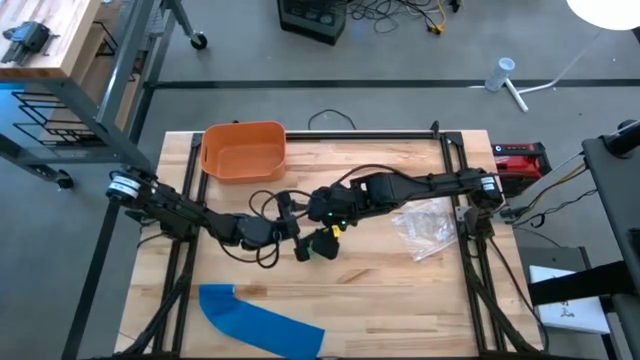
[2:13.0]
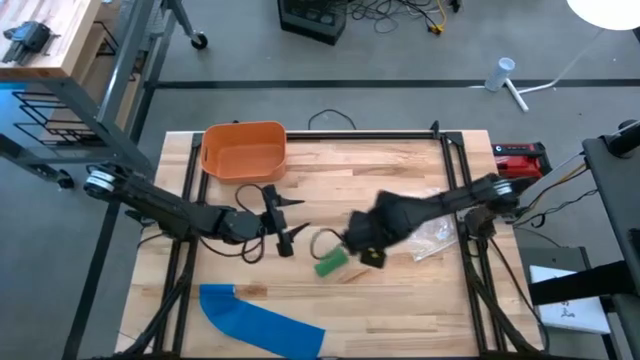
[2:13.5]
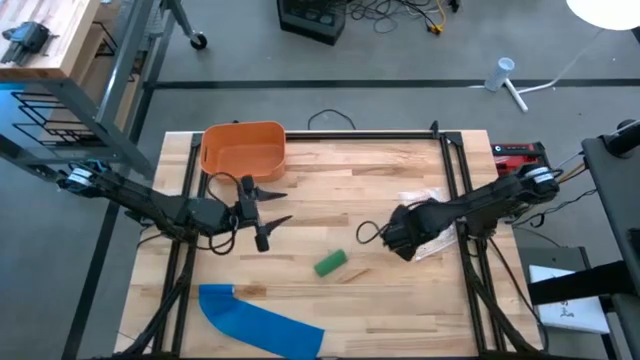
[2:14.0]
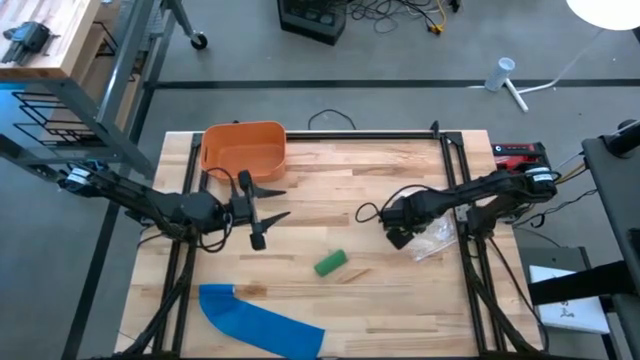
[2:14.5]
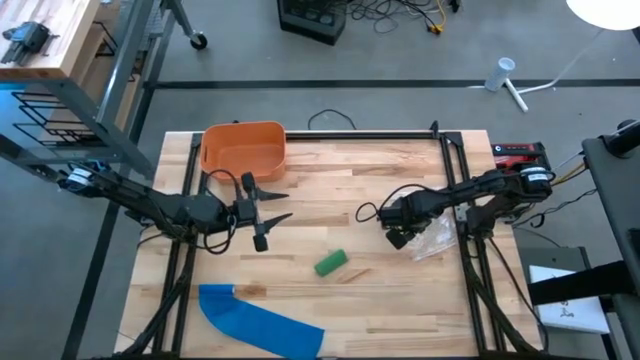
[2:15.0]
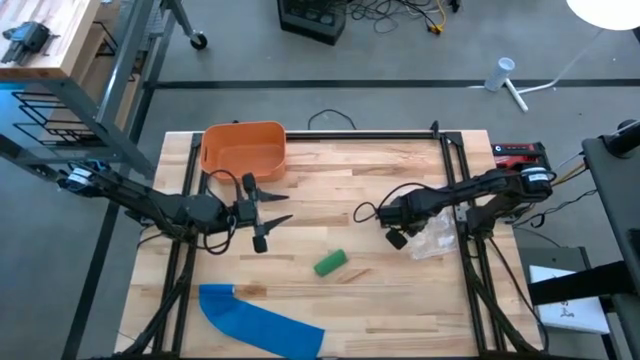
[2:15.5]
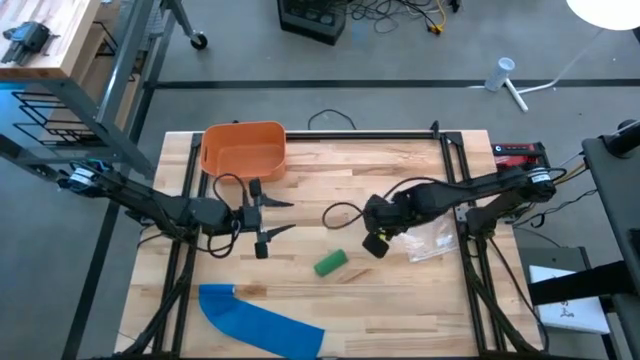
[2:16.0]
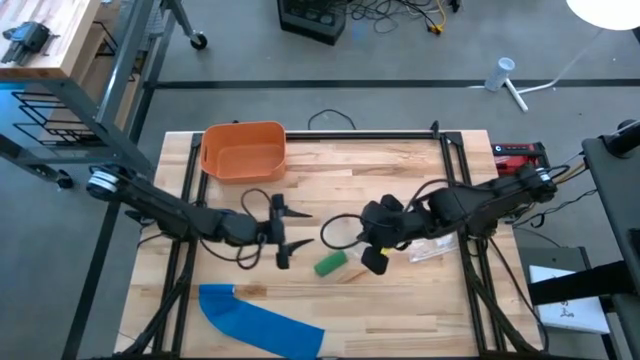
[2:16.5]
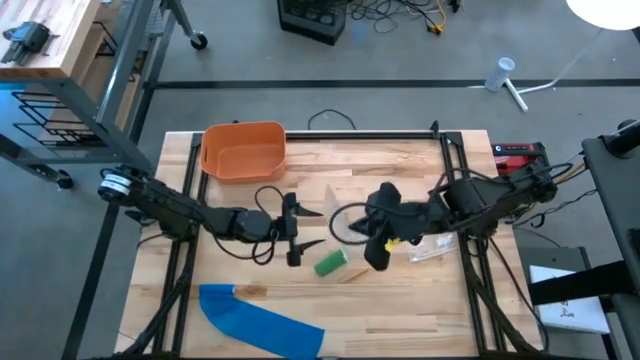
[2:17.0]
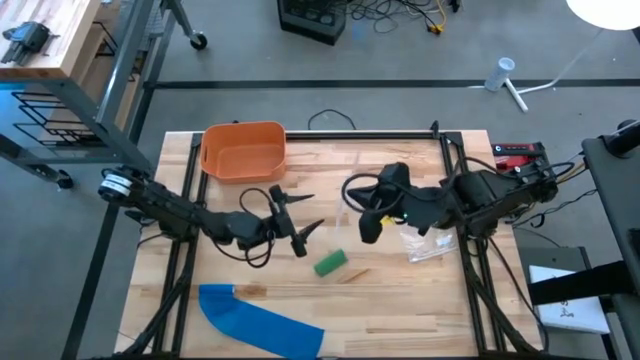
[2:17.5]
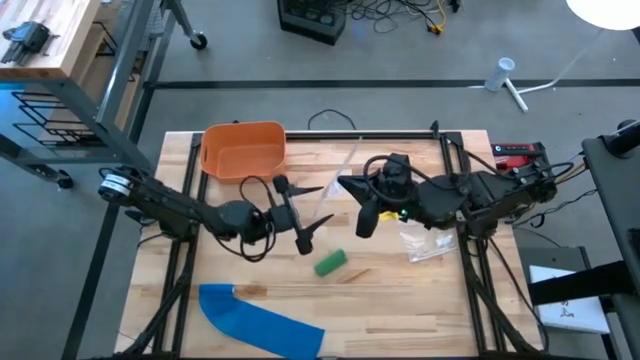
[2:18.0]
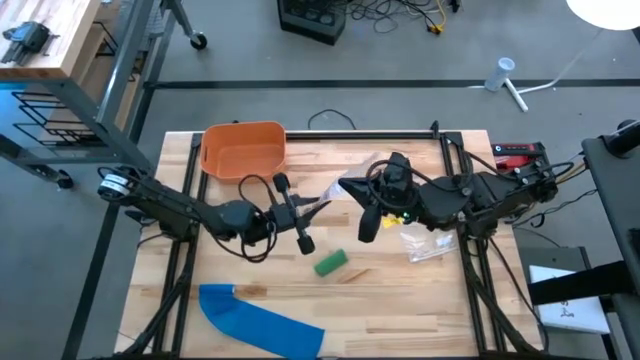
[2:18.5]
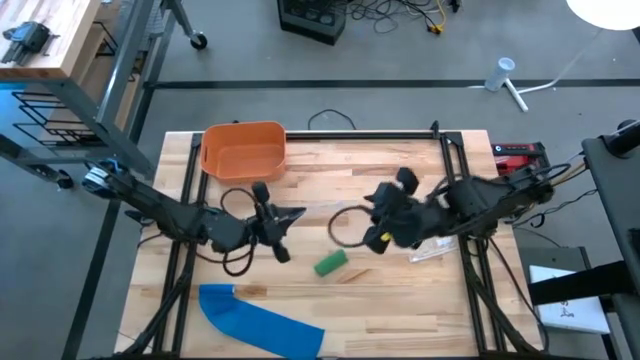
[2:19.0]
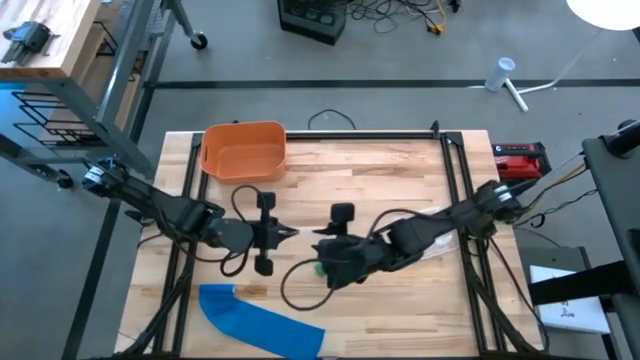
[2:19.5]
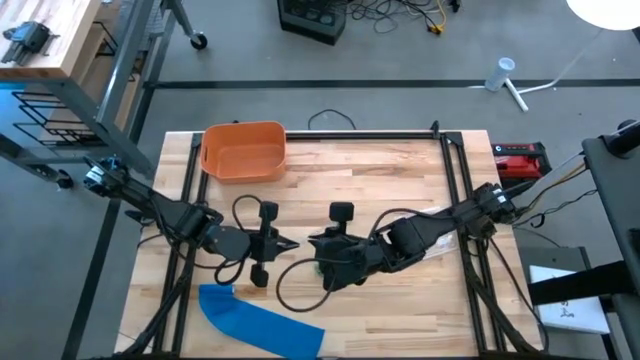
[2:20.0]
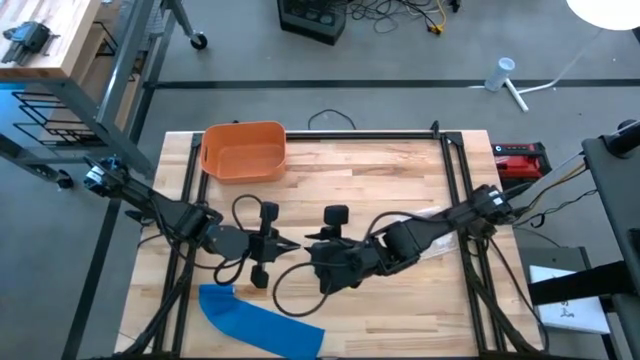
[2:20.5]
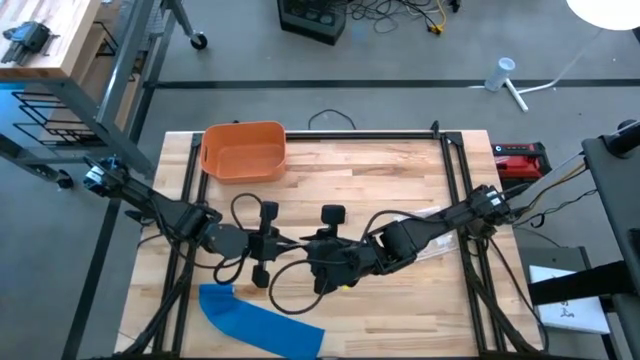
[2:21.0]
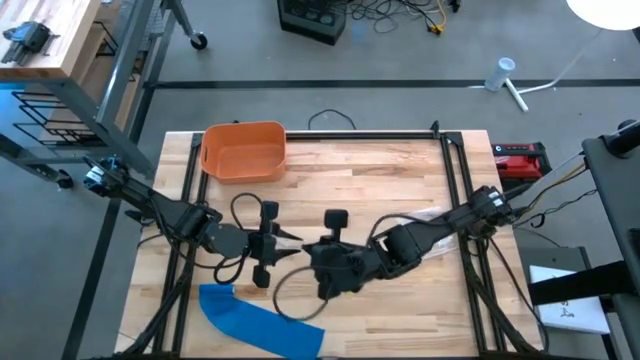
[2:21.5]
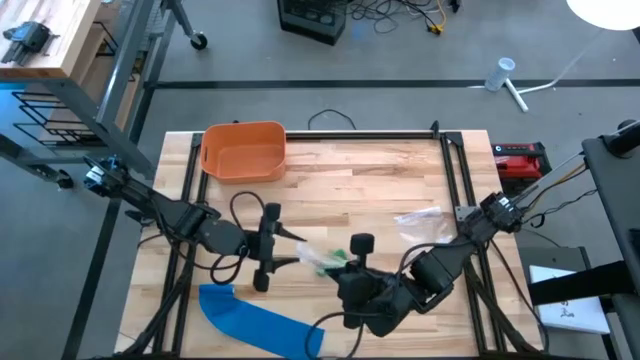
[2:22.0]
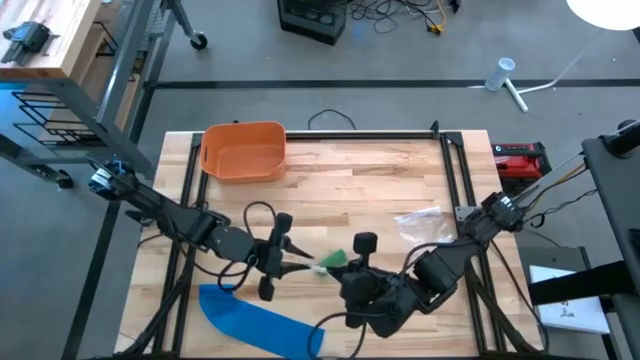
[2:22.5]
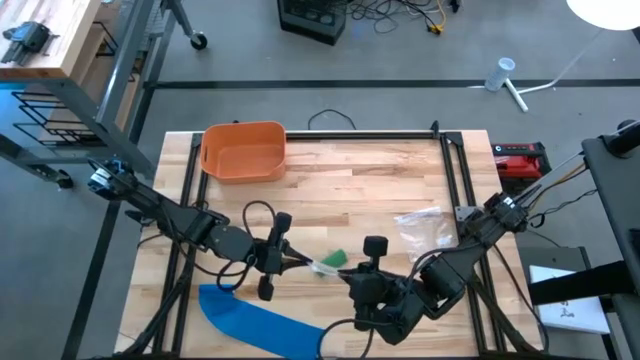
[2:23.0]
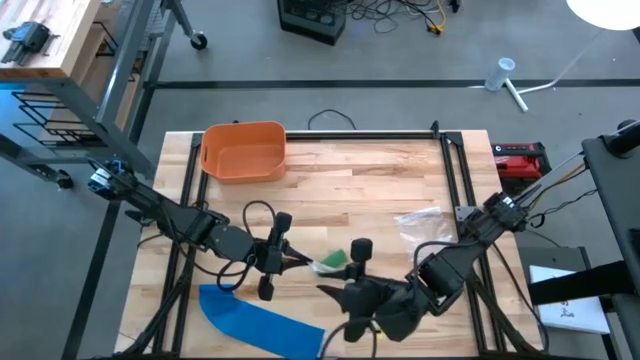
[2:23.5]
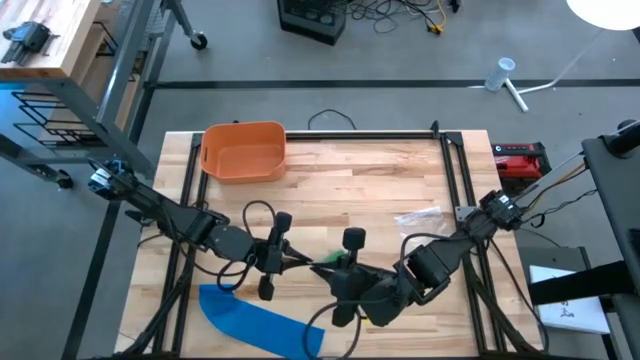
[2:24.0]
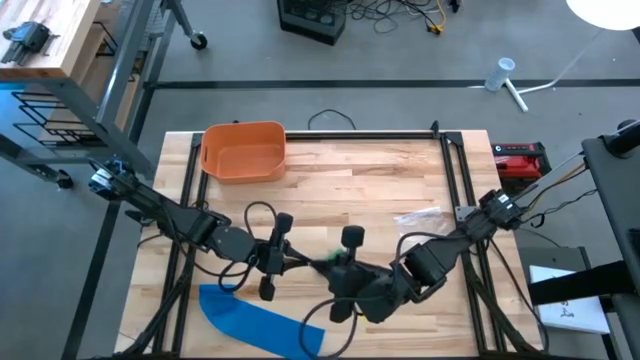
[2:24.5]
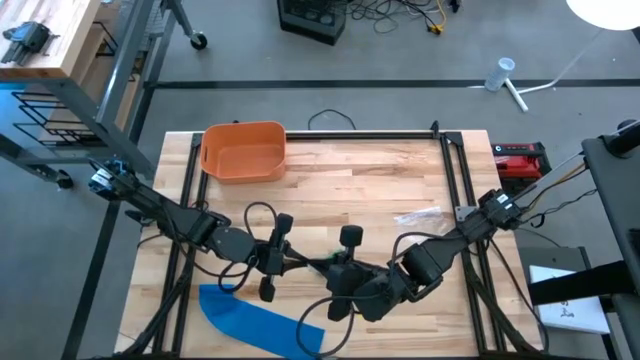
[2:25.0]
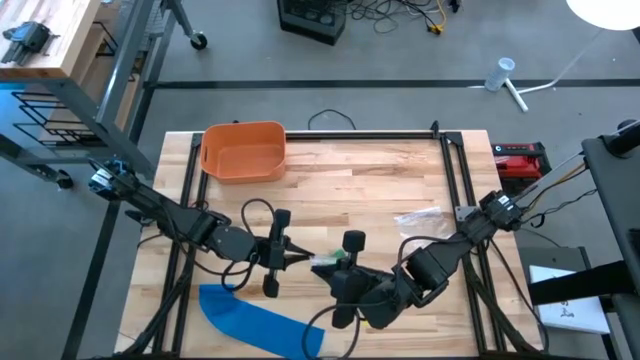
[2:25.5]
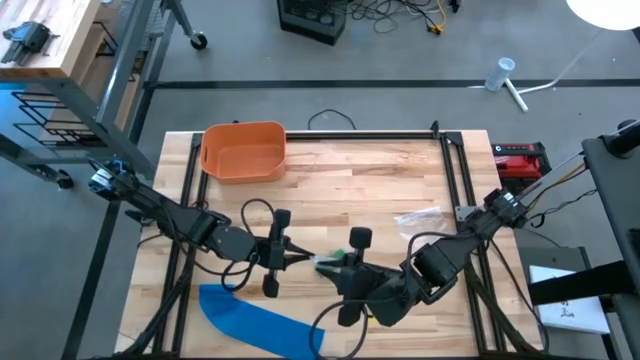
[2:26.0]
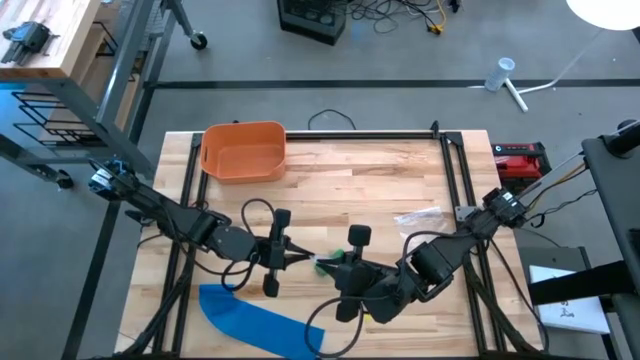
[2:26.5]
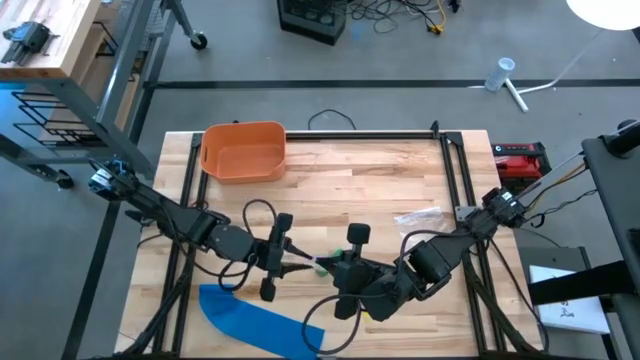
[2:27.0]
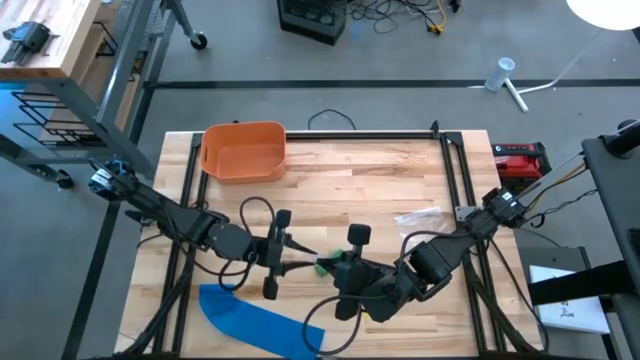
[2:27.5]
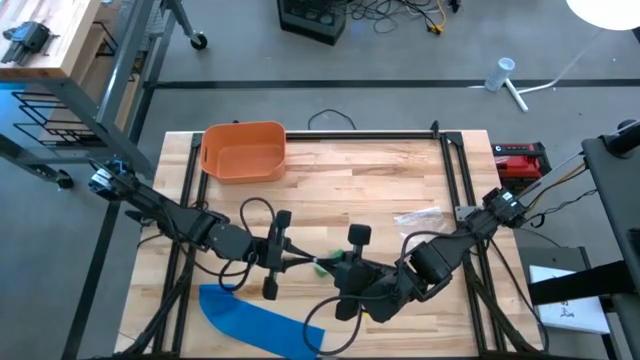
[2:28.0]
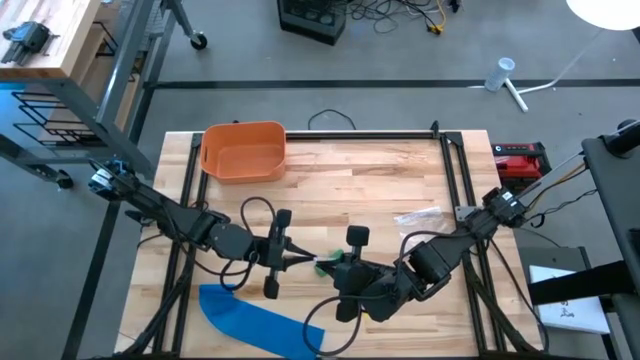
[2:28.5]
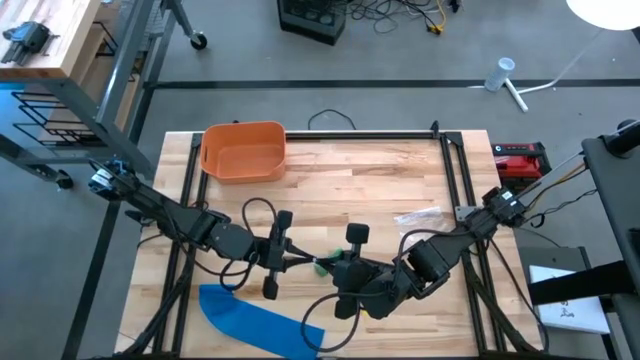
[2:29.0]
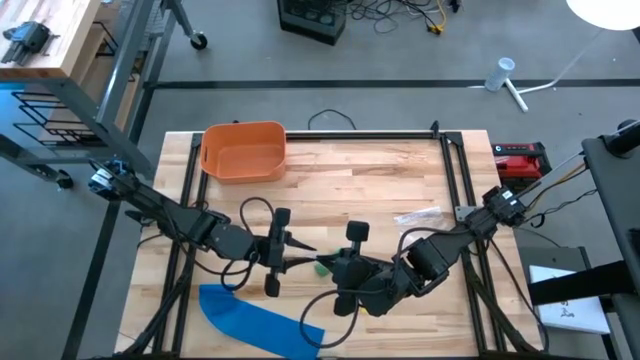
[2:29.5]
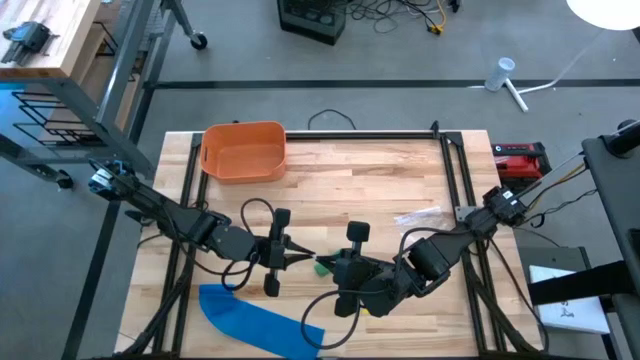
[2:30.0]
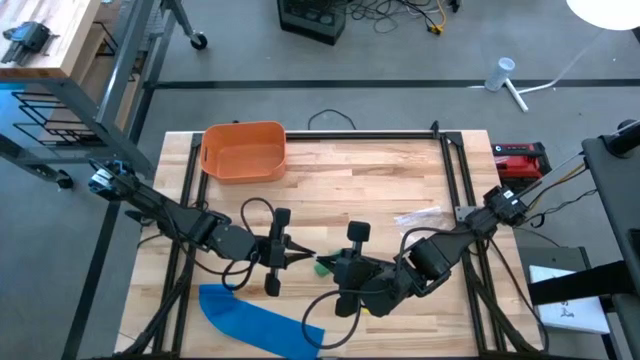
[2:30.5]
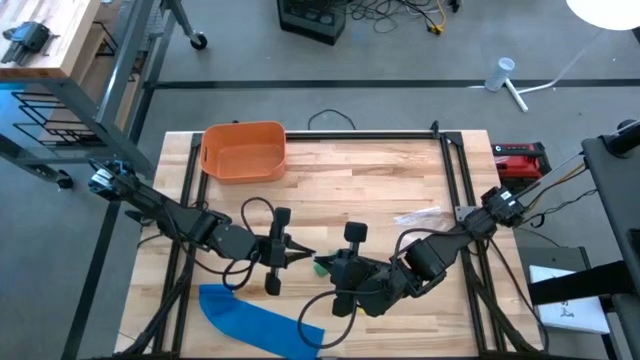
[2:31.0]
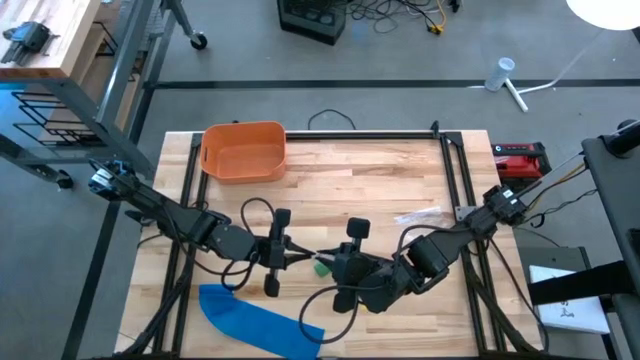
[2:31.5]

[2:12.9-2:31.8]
Task: Roll bandage
Open the top transparent zip bag

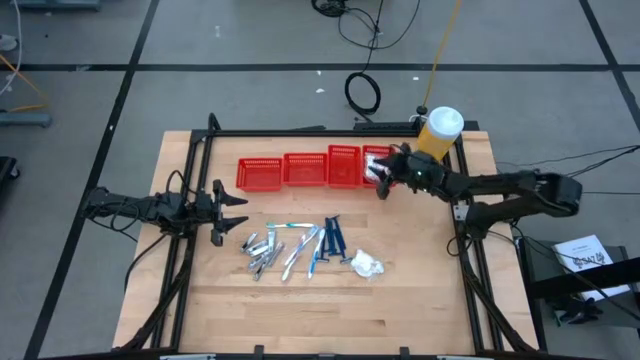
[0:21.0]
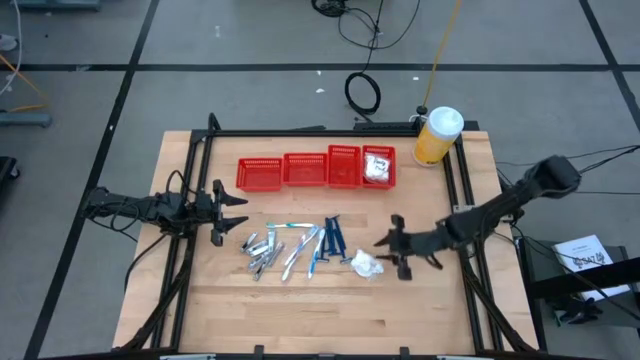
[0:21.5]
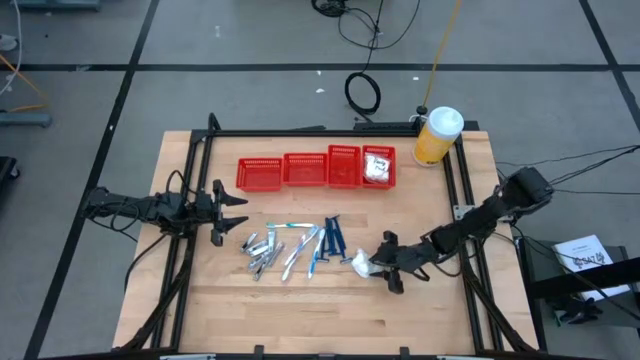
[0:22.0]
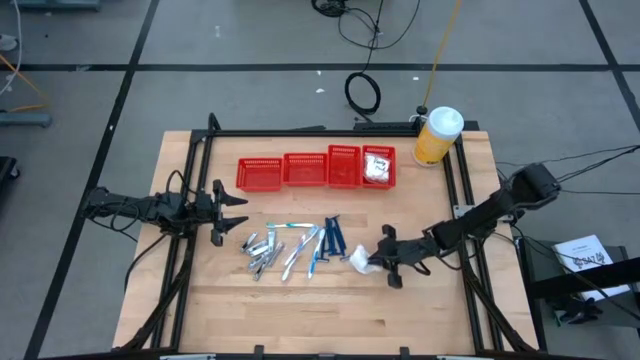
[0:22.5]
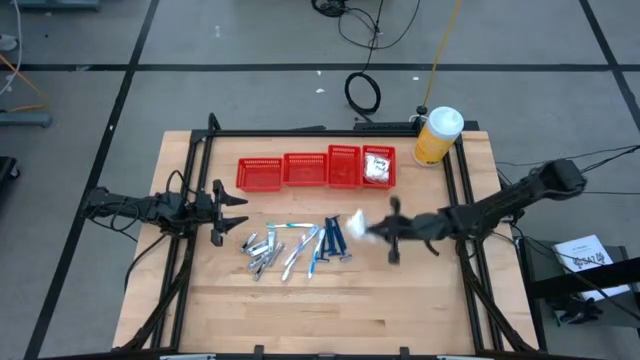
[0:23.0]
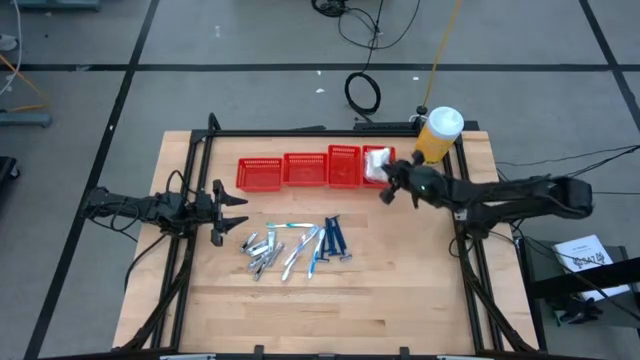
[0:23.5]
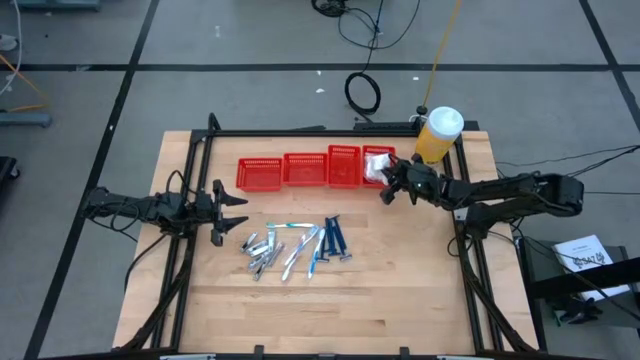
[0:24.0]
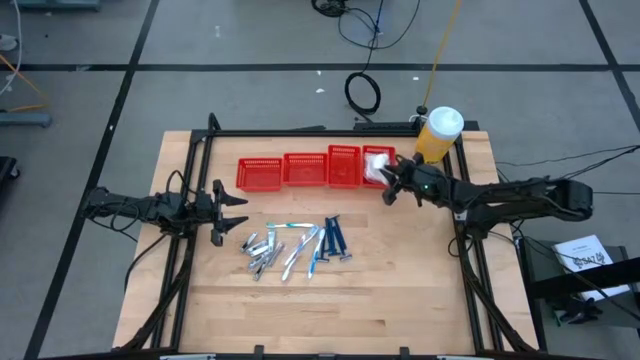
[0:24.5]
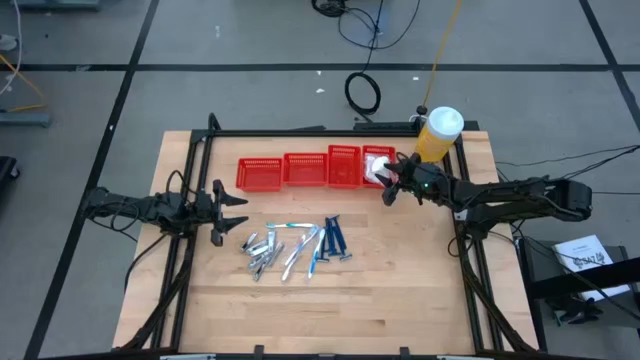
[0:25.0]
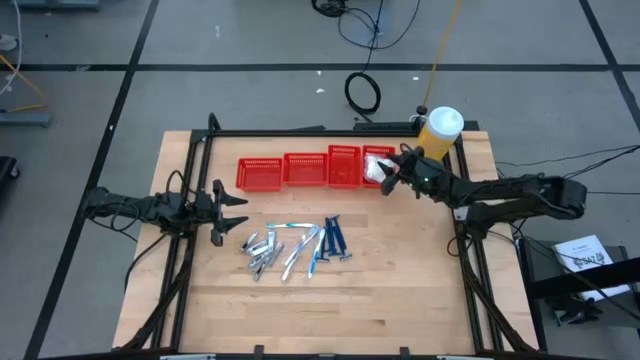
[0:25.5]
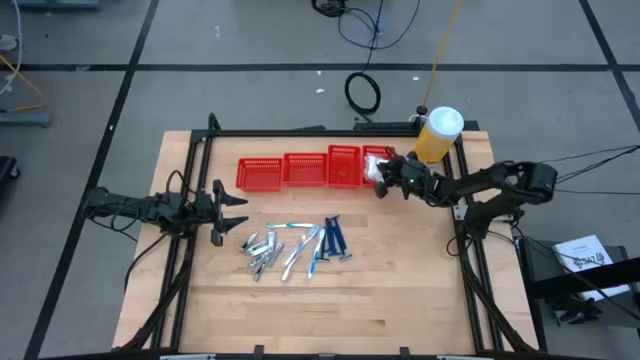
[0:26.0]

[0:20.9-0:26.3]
Task: Pick & Place Travel size toiletries
Put the vanity pack into the vertical right red bin
